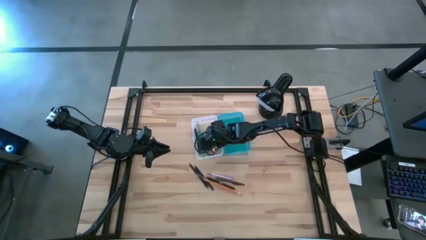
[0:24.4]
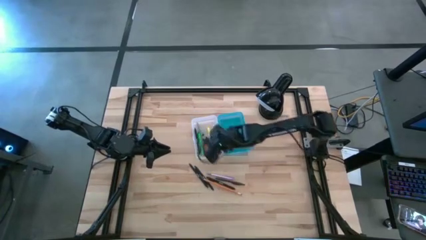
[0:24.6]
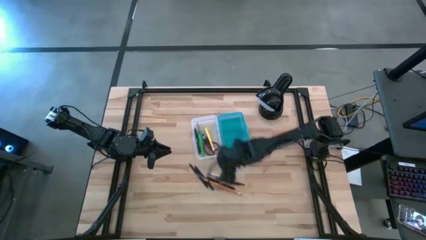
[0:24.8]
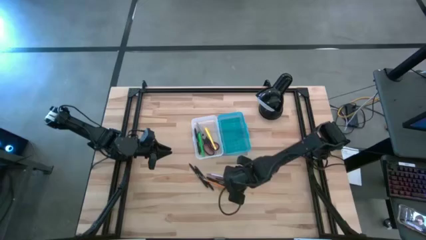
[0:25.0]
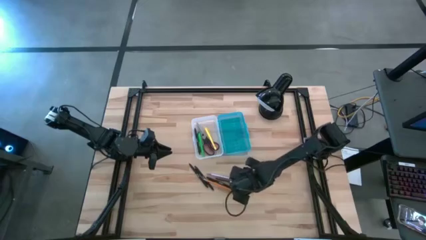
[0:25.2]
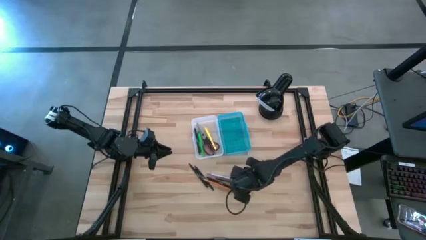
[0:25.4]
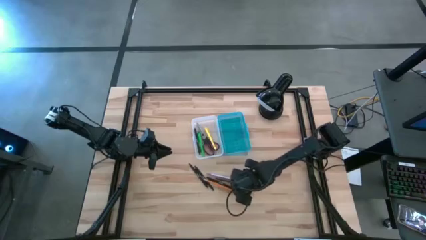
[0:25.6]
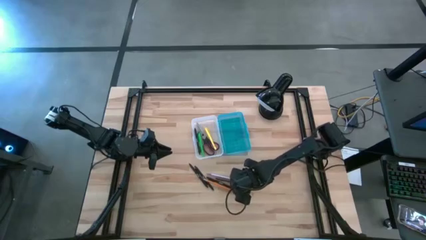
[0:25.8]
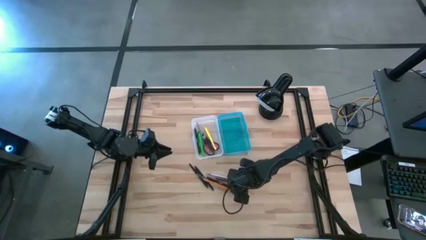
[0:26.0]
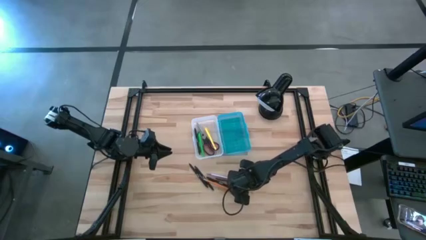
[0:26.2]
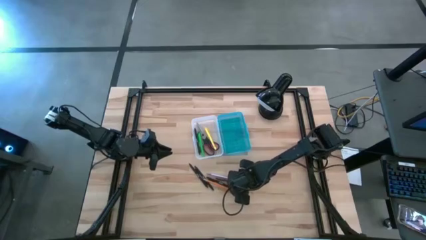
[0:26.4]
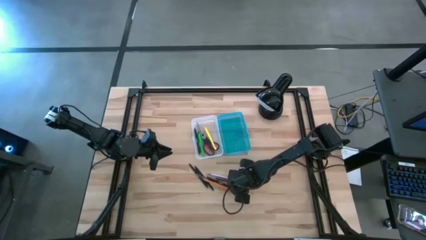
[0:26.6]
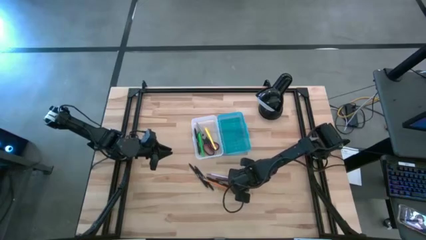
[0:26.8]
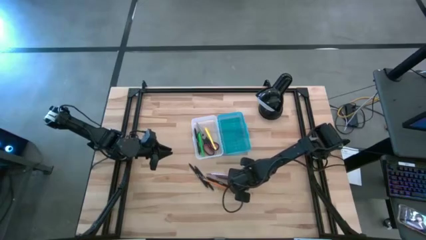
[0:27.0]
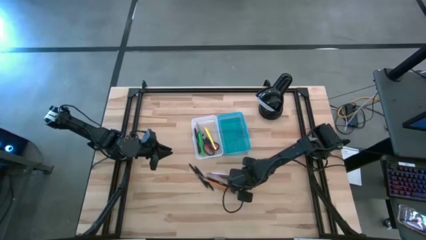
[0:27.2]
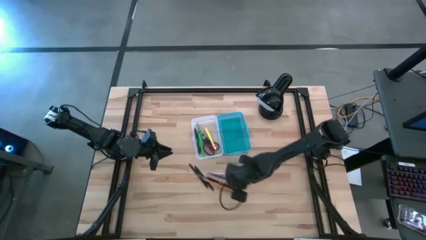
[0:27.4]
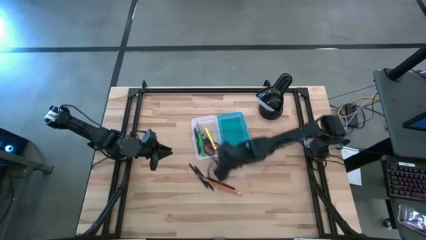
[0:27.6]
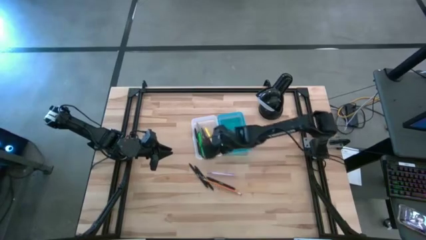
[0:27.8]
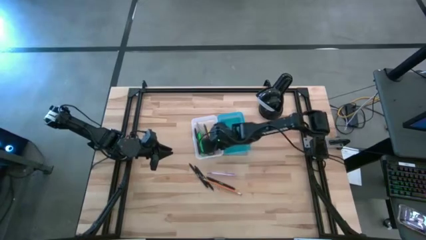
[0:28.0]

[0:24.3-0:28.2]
Task: Pick & place school supplies into a supply box
Put the brown pen into the blue supply box

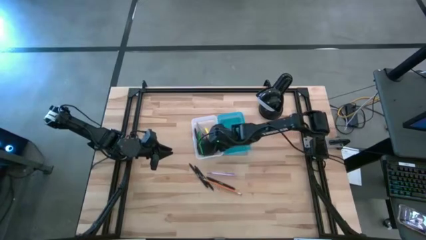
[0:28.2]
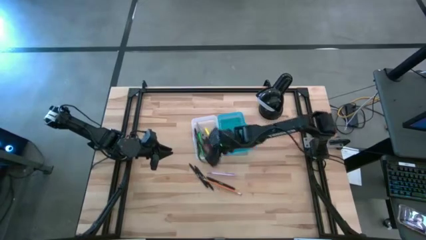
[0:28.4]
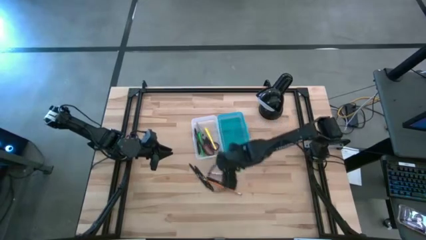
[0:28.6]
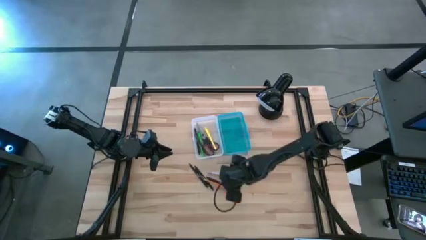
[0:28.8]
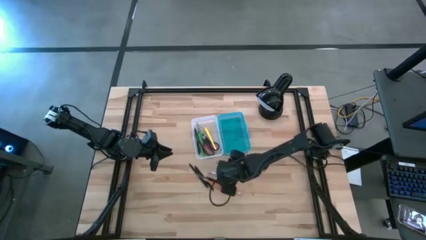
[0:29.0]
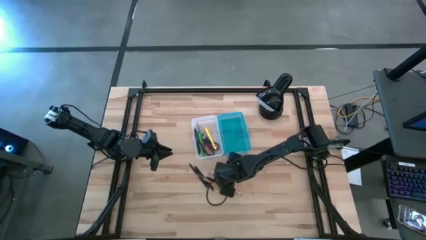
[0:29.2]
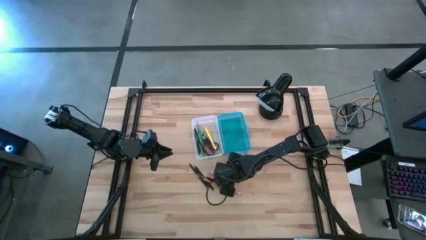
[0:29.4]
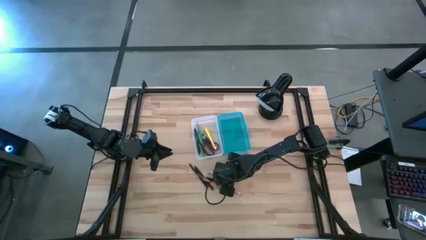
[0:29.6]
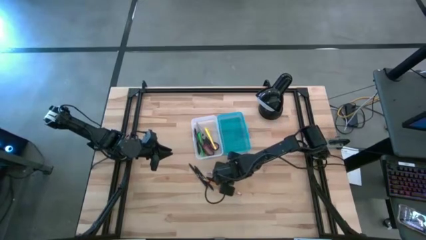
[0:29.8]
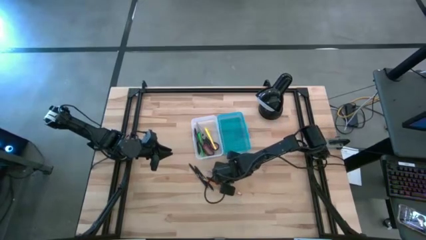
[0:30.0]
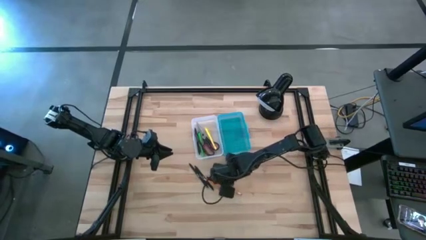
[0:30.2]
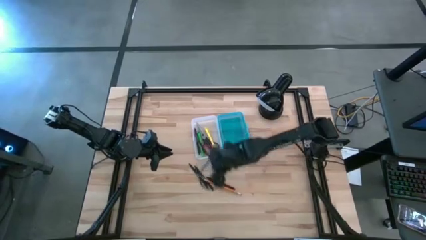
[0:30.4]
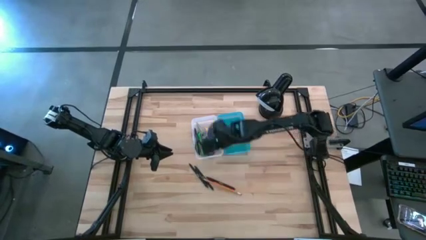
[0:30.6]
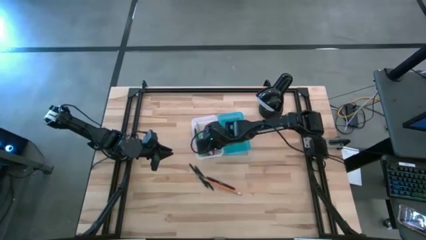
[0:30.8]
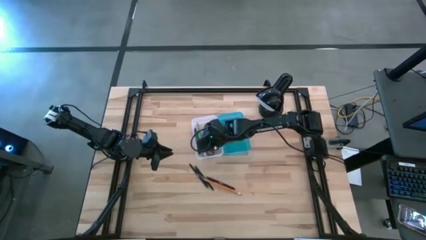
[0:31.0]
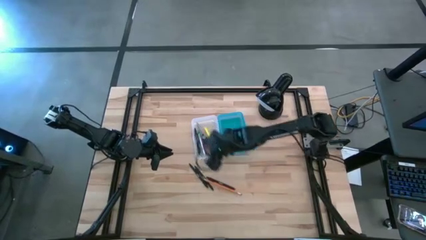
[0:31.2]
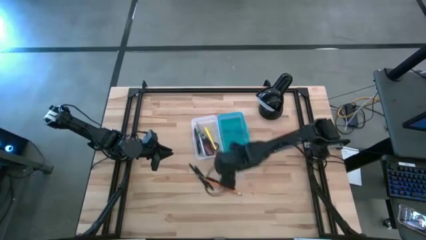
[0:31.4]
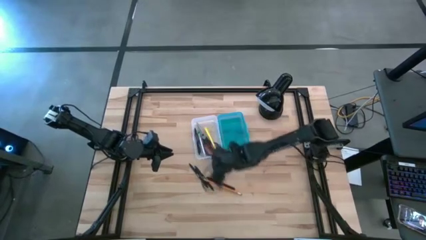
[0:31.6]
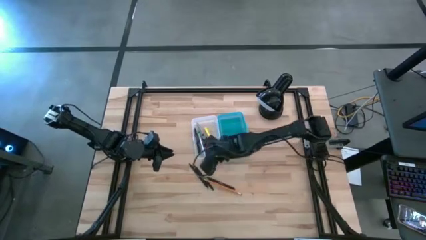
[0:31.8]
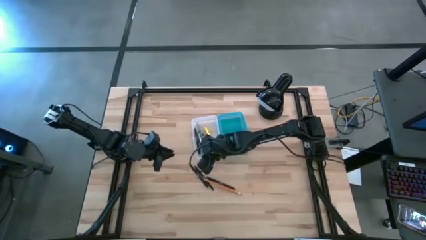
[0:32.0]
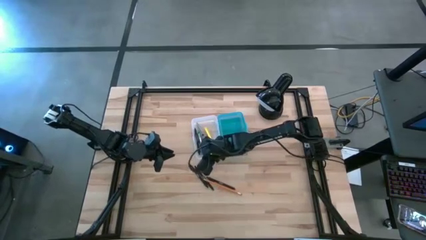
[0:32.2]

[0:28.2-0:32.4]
Put the purple pen into the blue supply box

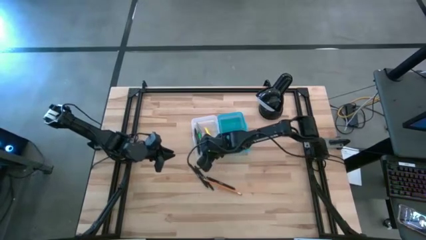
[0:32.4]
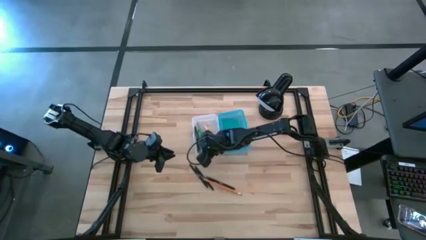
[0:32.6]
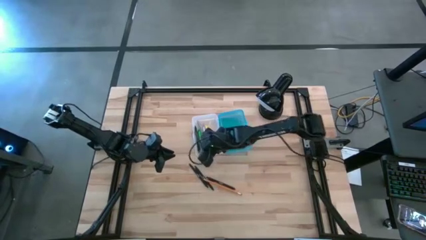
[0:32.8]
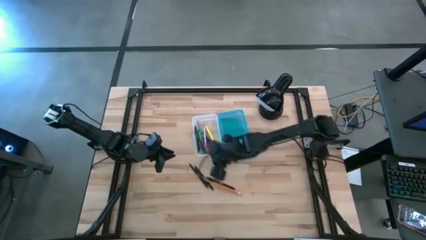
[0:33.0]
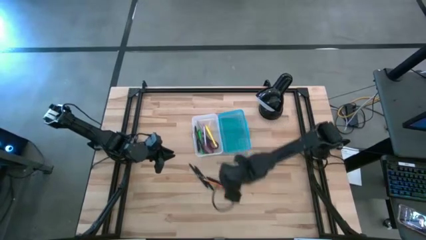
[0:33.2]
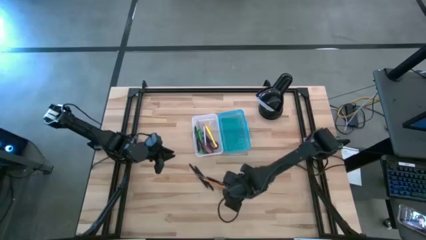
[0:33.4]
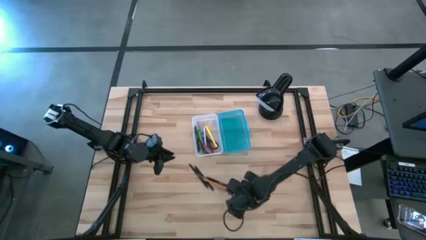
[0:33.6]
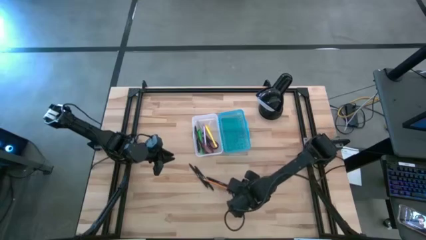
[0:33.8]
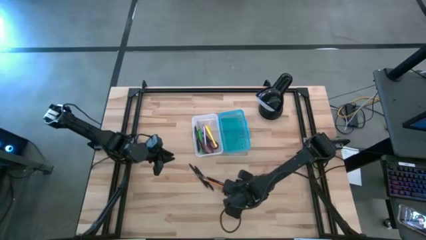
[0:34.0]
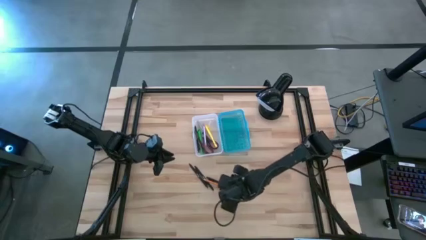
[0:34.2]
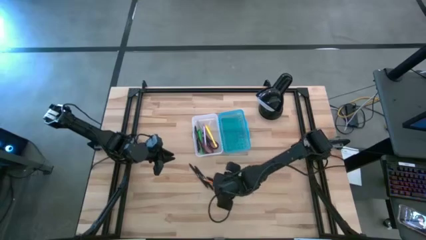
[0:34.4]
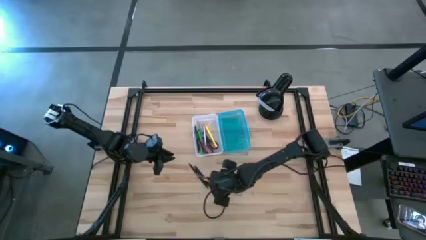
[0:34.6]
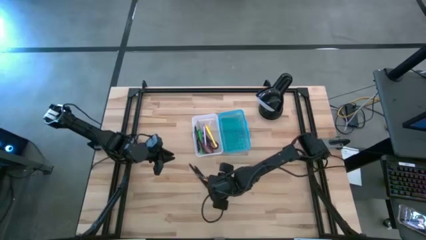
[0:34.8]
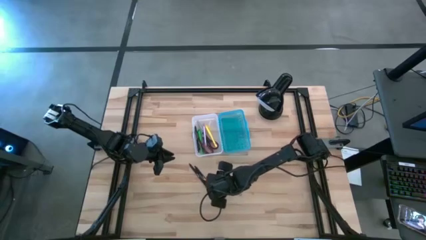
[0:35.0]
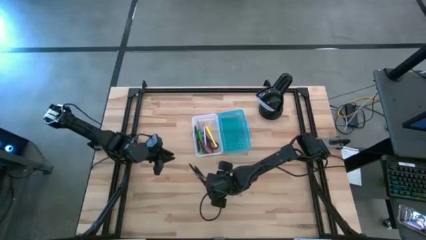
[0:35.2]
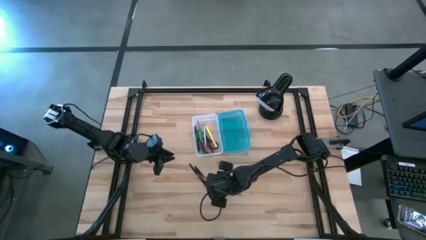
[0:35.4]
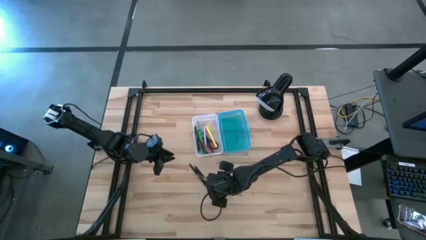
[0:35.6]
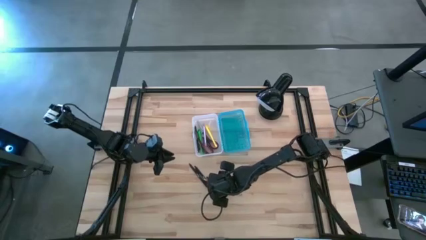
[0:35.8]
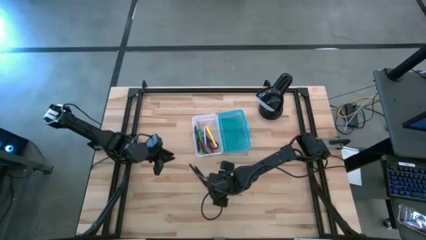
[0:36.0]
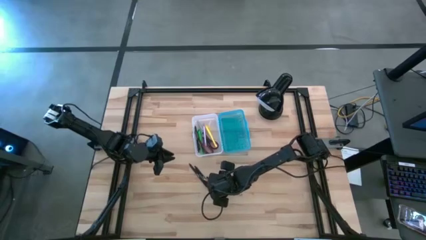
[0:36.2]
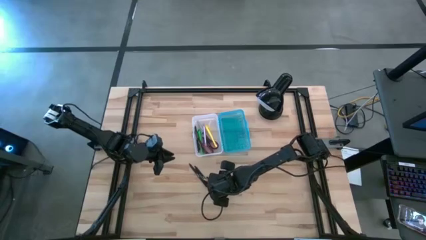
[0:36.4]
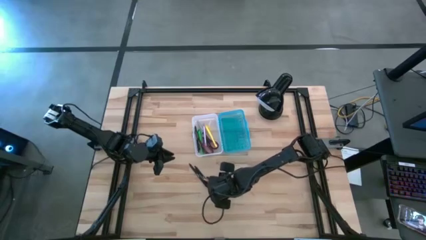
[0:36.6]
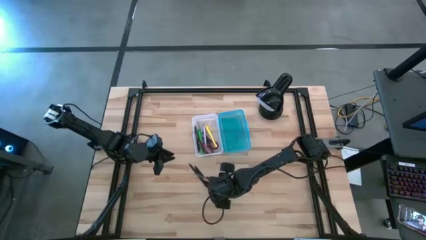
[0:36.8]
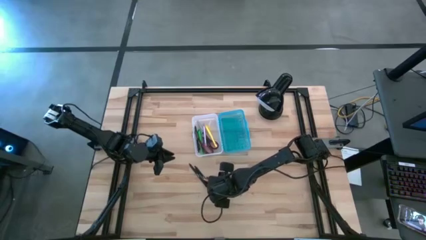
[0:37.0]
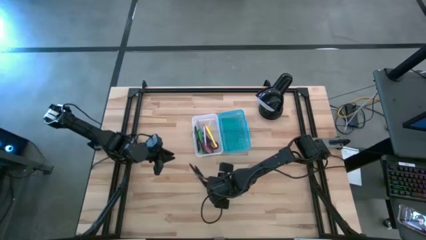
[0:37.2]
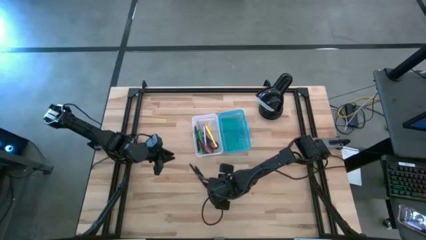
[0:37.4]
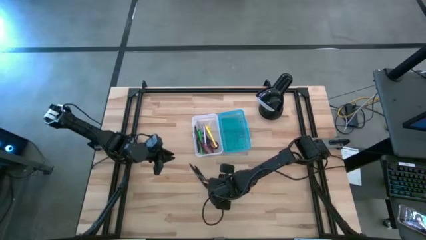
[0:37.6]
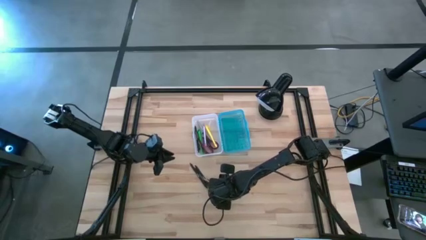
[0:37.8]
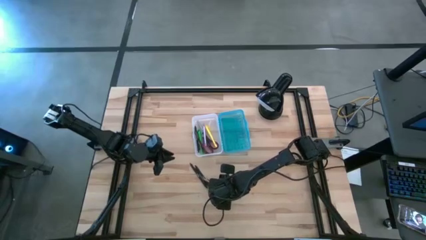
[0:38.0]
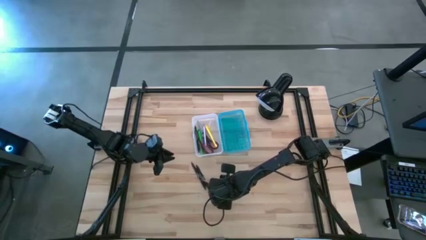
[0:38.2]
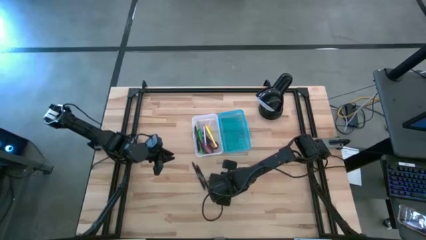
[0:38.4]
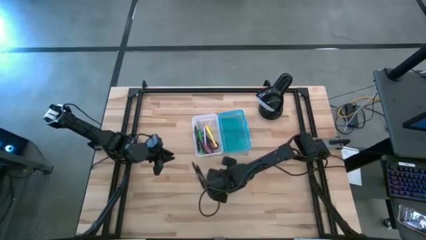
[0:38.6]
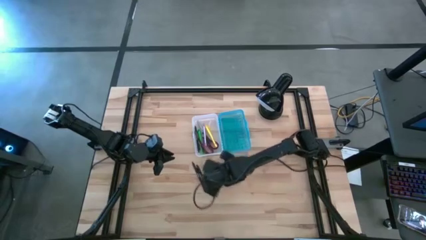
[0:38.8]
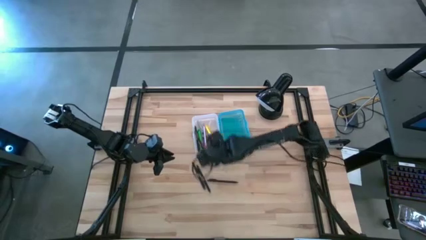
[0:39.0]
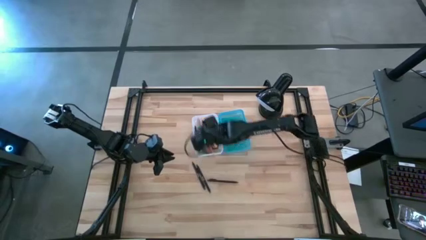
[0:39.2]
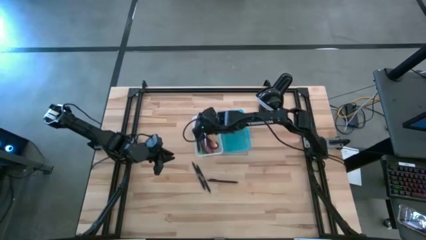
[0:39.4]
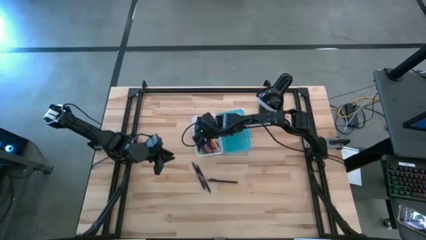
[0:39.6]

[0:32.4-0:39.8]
Put the orange pencil into the blue supply box

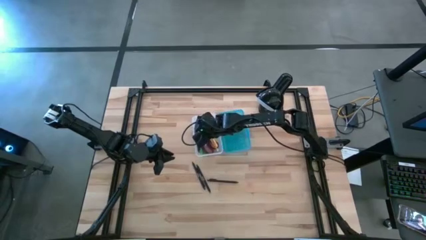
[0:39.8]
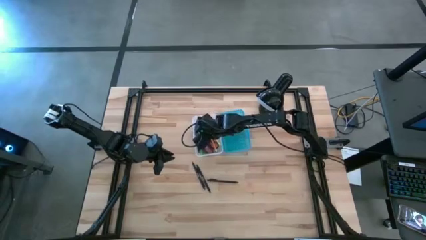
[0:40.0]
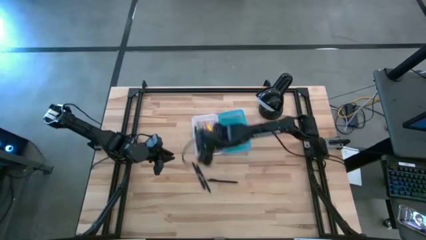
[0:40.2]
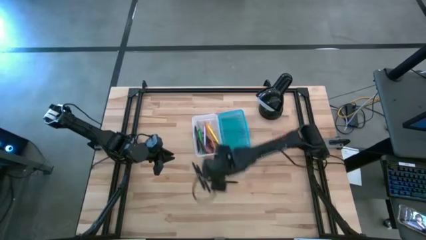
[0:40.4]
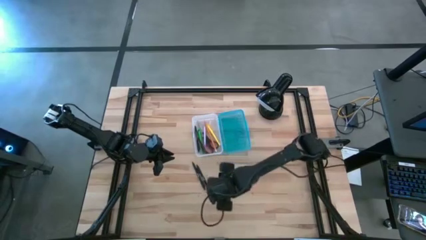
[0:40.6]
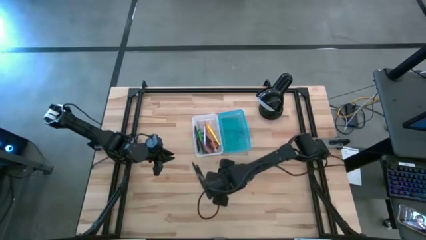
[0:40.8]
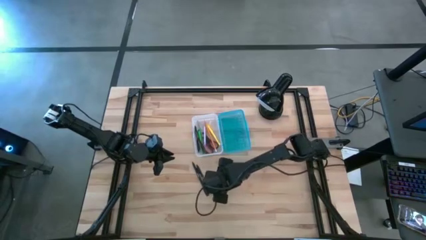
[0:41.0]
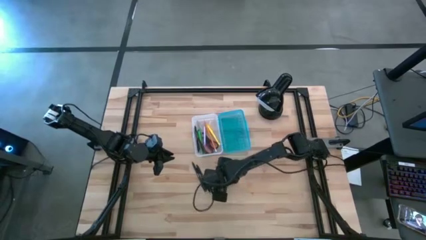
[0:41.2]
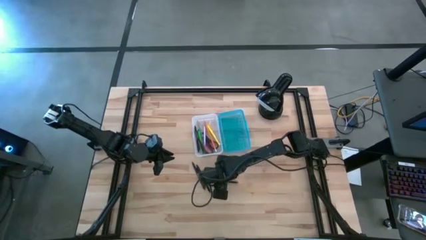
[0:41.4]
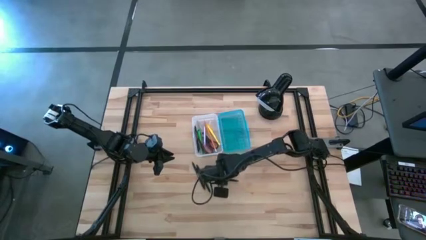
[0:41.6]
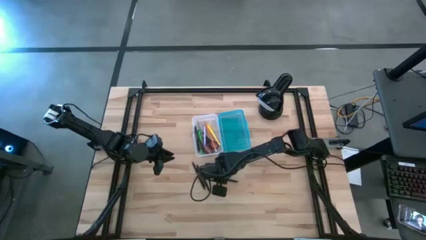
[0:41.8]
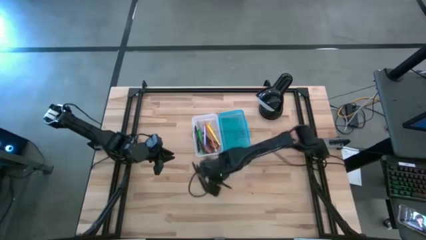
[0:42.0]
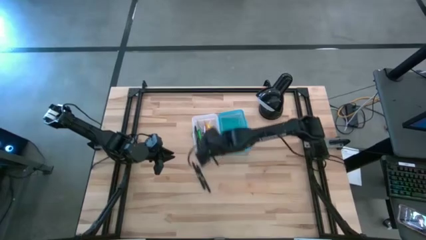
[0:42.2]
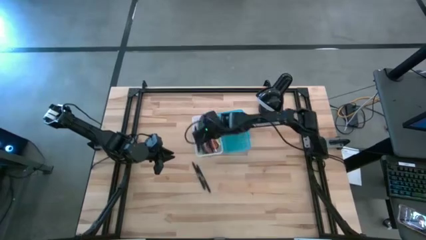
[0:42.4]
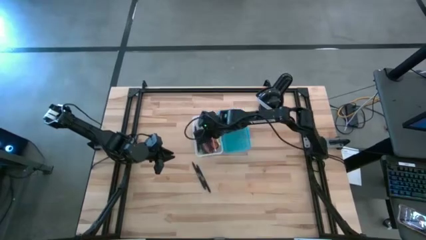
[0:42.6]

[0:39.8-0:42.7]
Put the black pen into the blue supply box
